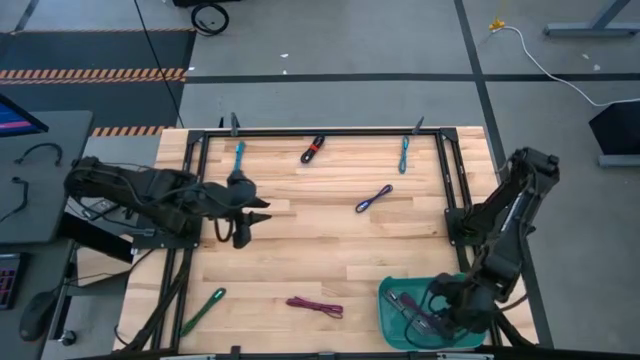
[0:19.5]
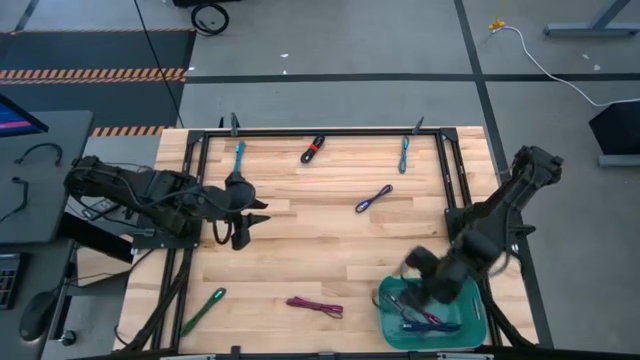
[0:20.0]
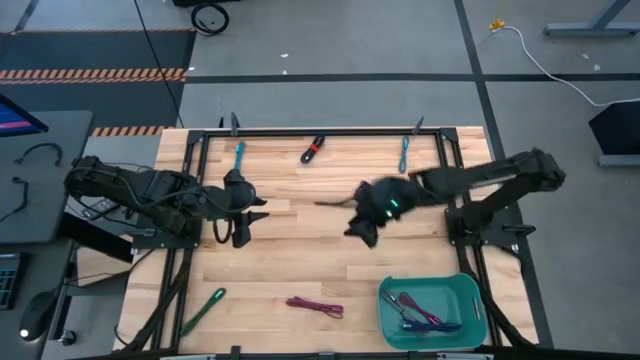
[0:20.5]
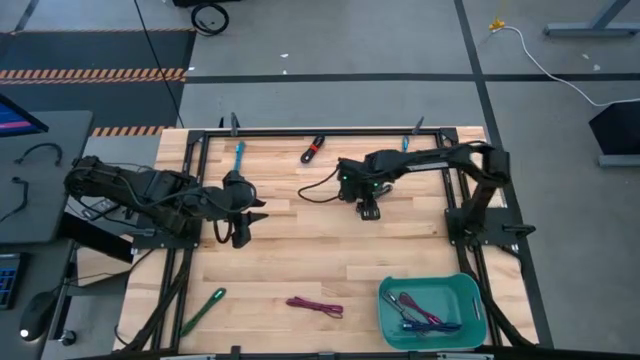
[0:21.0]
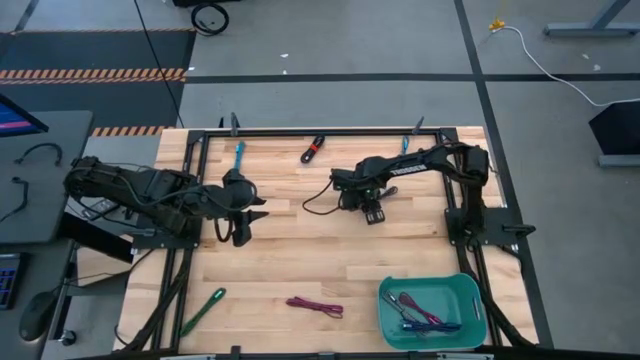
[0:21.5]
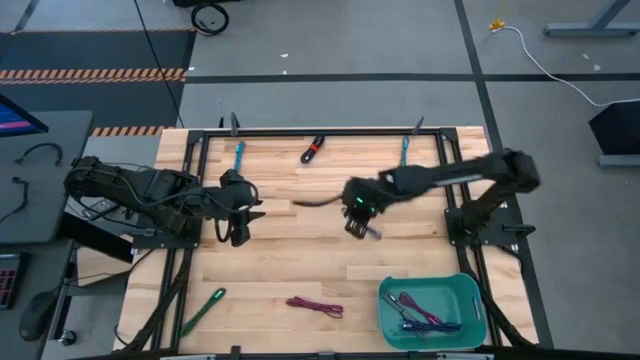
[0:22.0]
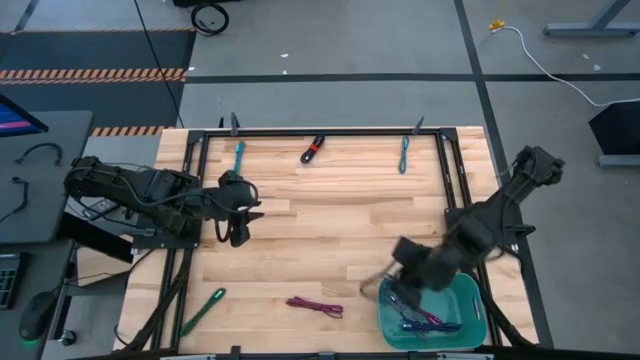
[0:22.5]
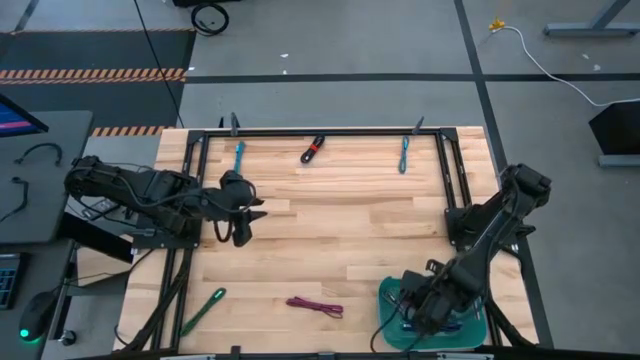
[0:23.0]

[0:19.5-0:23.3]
Task: Pick and place USB-C Cables
Put the purple charger cable into the green bin

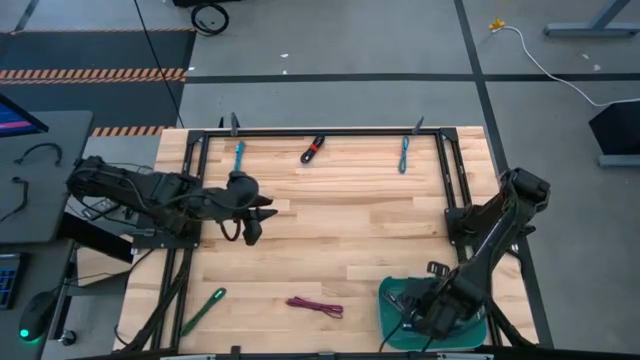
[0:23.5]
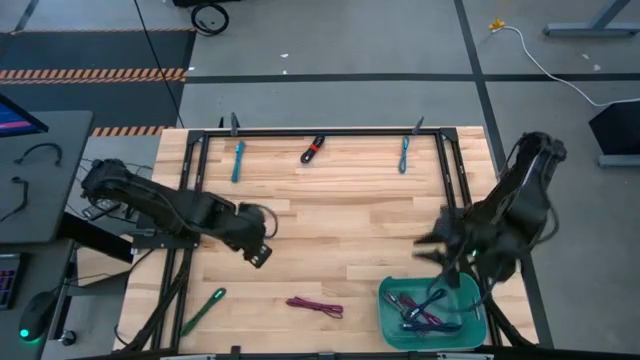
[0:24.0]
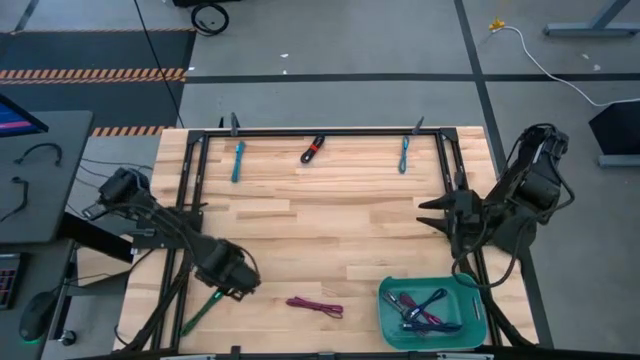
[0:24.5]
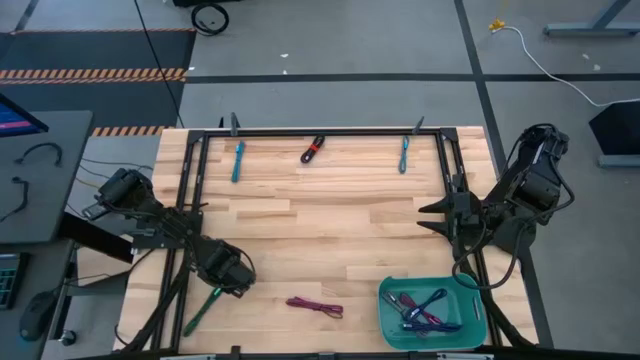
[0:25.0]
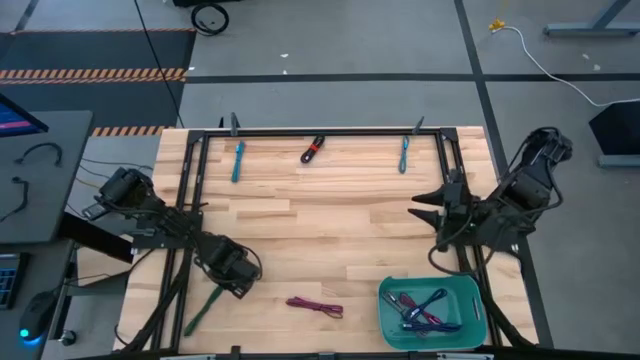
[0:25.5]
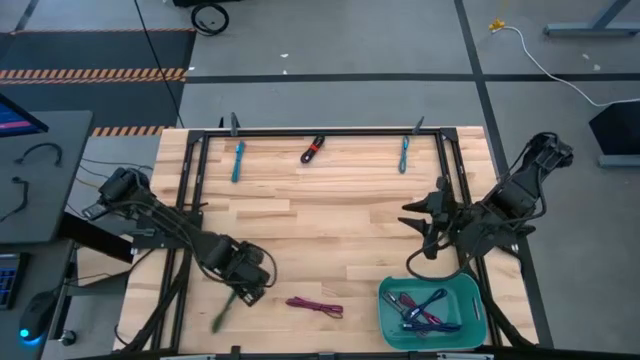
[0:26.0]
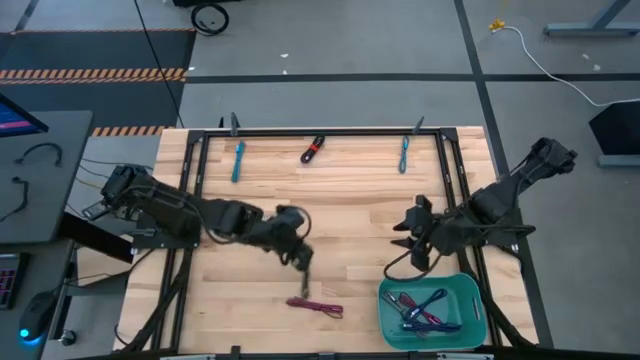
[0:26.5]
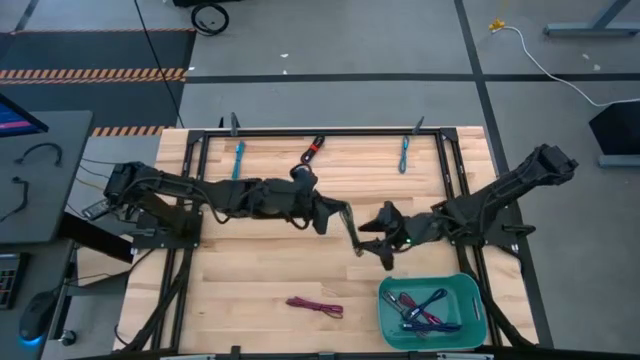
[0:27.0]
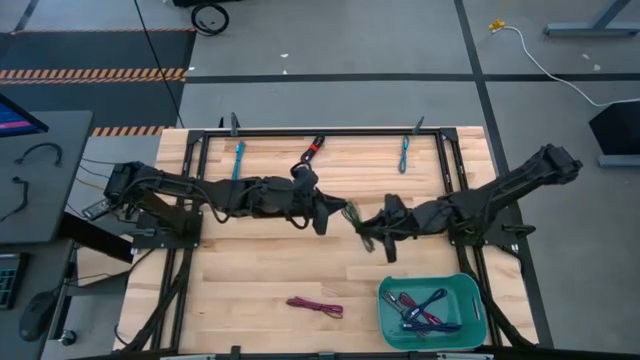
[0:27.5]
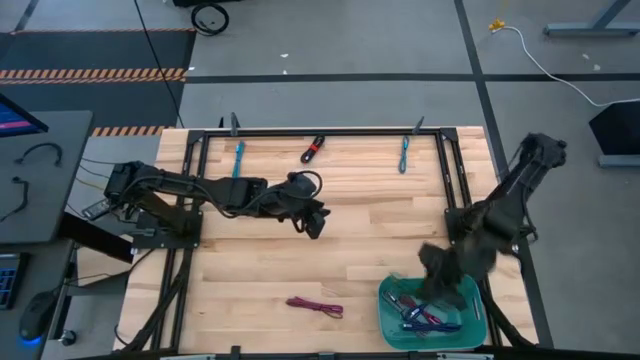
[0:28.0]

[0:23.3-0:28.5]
Put the green charger cable into the green bin

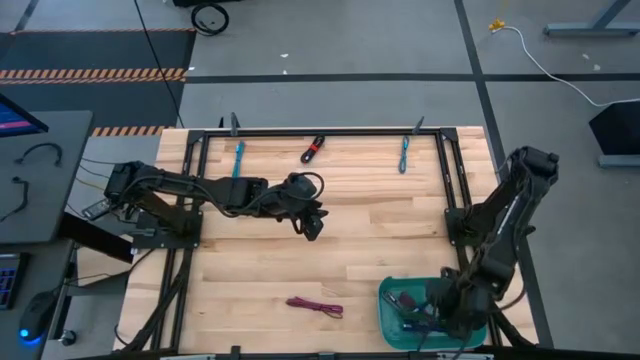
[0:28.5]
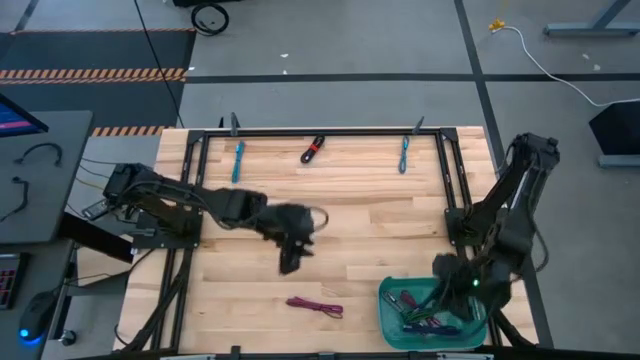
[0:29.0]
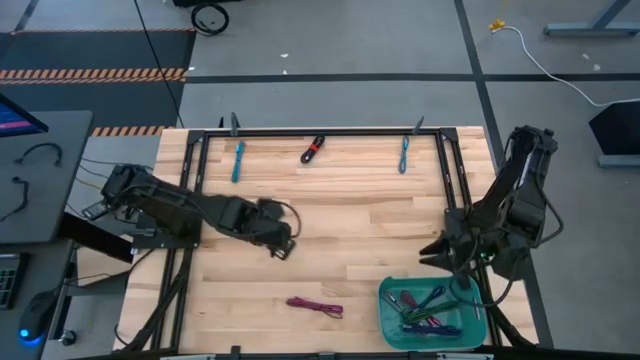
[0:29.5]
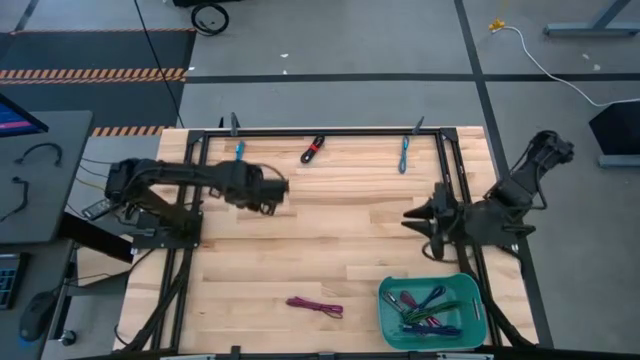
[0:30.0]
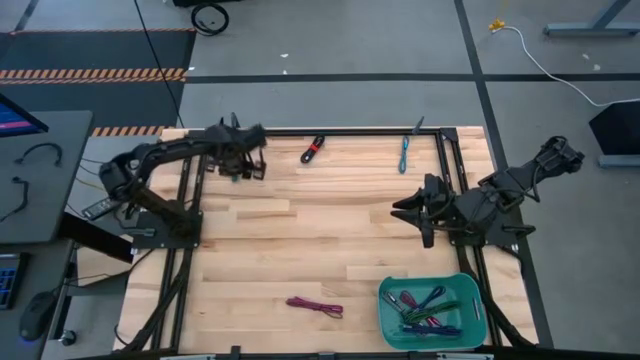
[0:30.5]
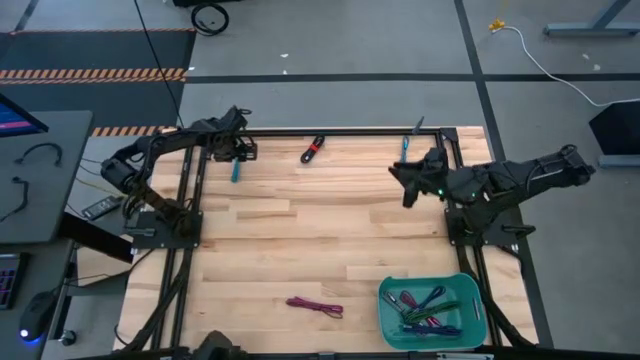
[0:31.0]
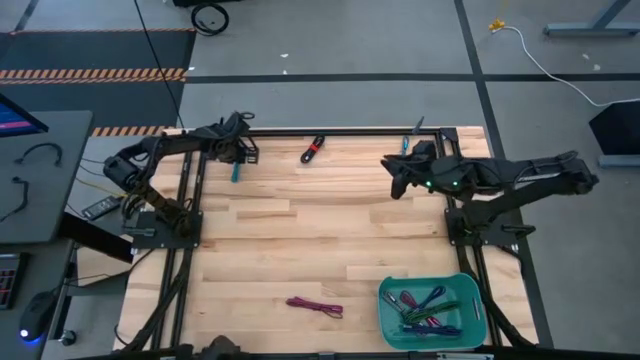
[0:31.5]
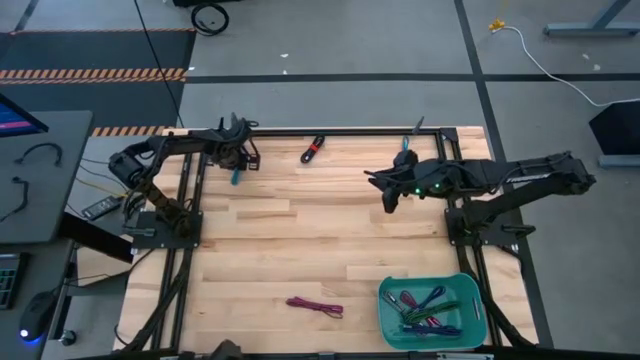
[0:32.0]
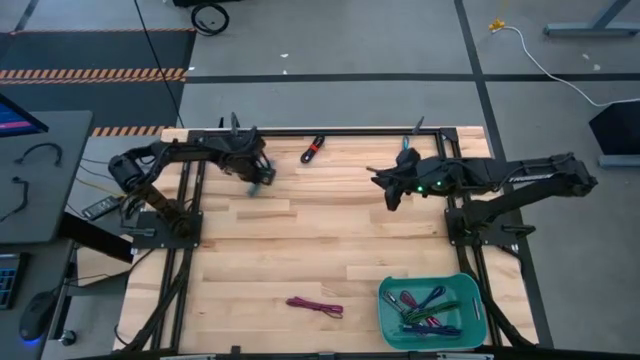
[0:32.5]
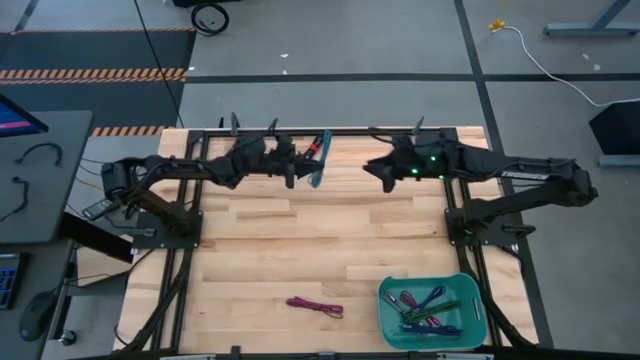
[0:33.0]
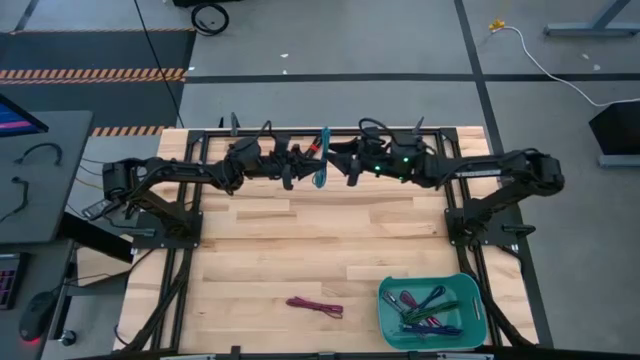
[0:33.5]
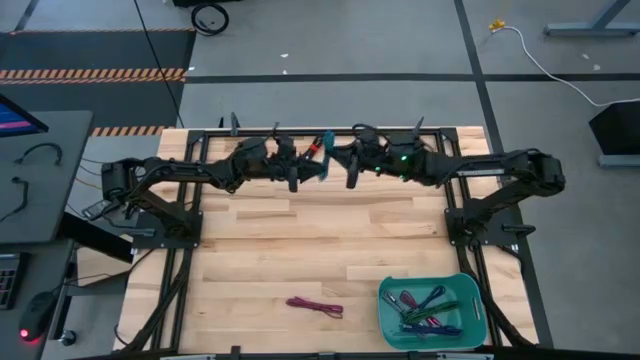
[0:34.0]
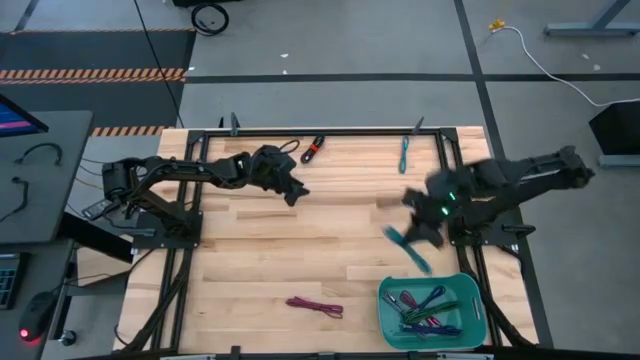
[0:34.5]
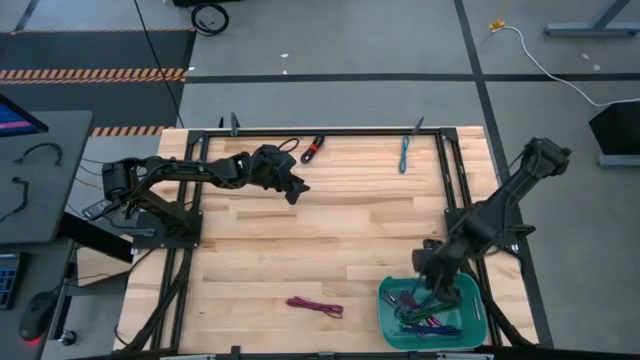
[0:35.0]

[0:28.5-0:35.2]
Put the blue charger cable into the green bin

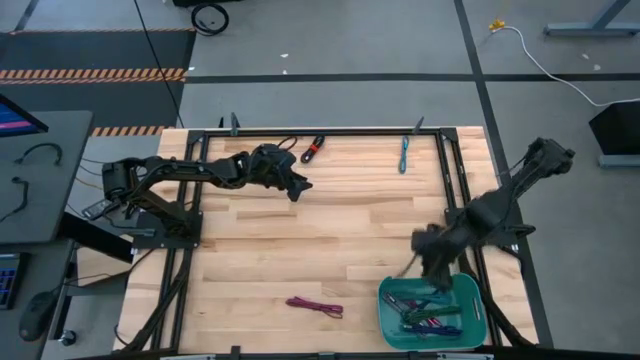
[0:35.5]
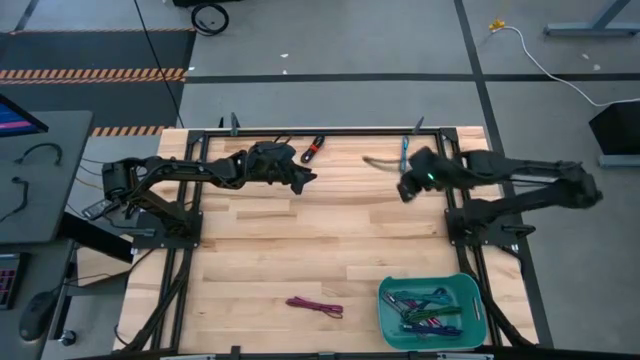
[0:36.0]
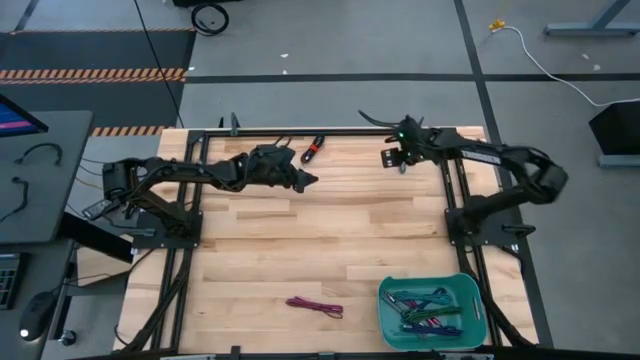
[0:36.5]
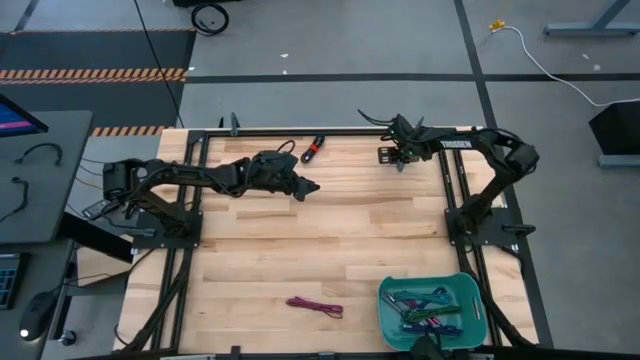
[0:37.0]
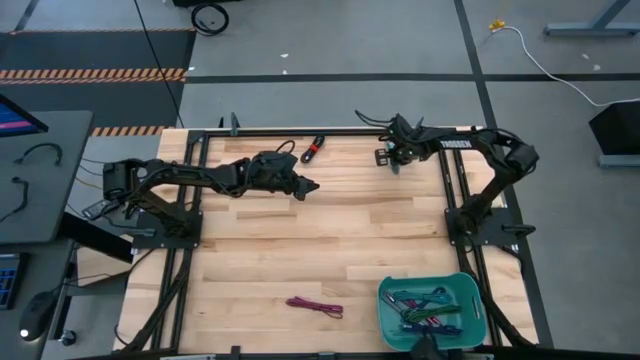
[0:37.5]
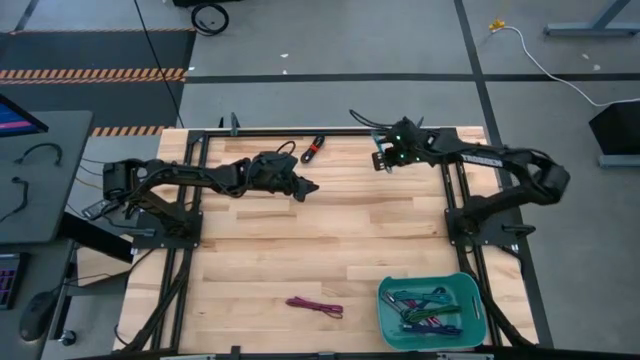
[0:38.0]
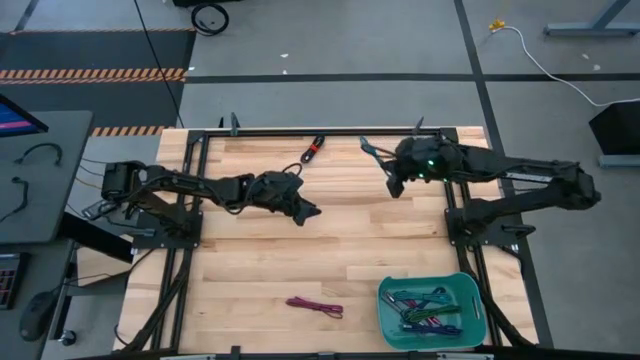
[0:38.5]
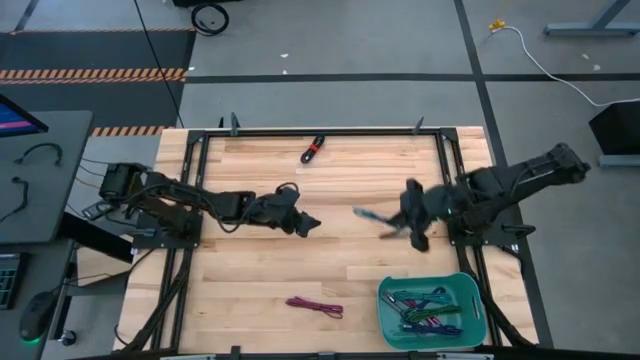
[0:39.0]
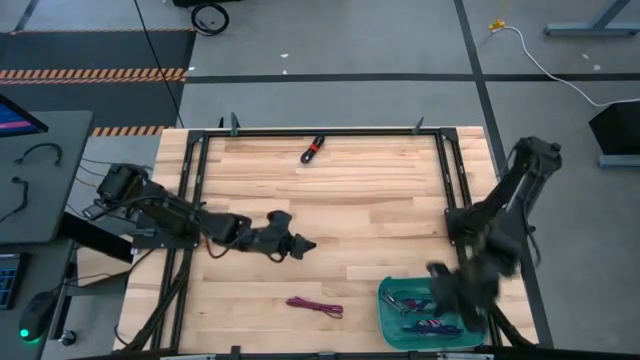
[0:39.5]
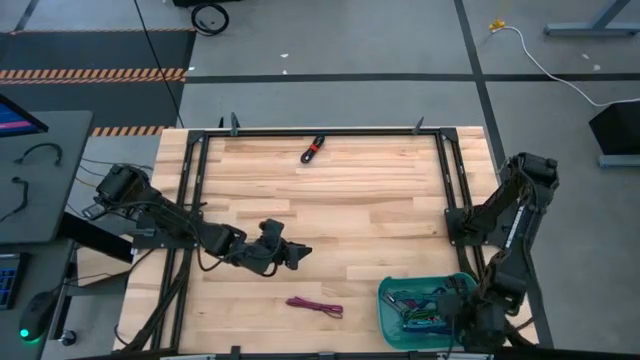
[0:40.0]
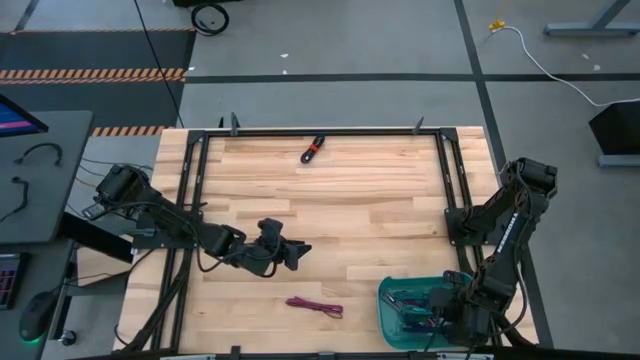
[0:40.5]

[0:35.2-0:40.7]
Put the blue charger cable into the green bin
